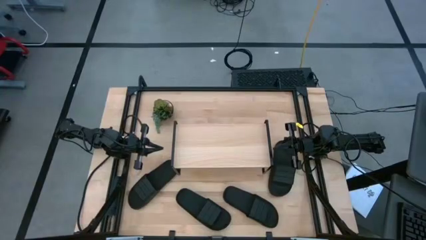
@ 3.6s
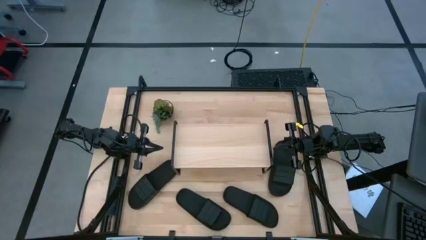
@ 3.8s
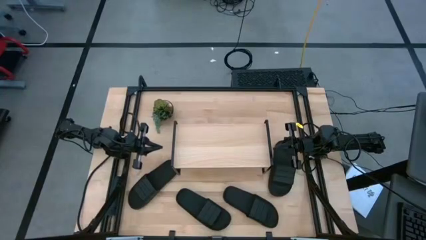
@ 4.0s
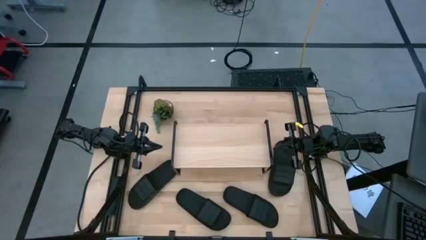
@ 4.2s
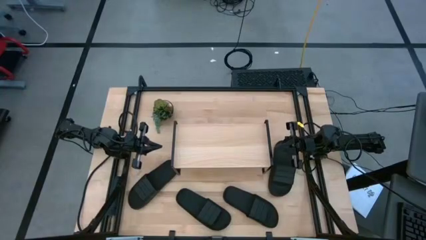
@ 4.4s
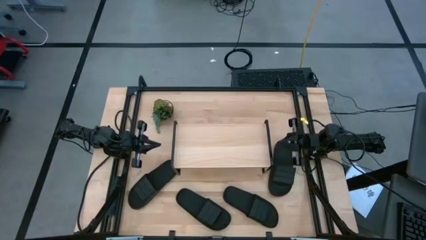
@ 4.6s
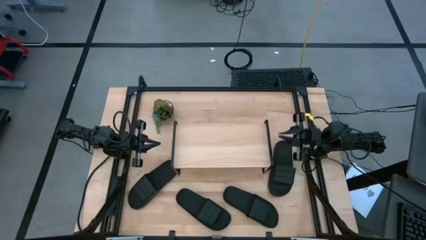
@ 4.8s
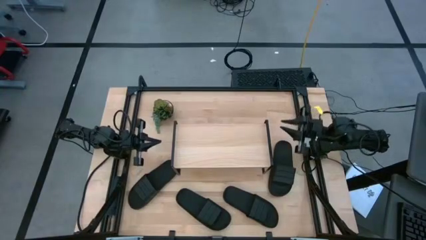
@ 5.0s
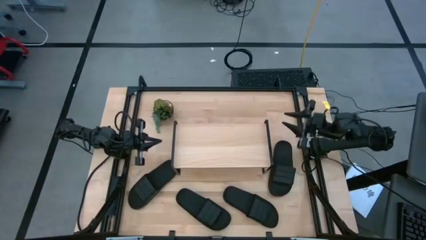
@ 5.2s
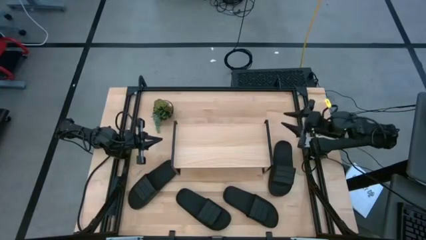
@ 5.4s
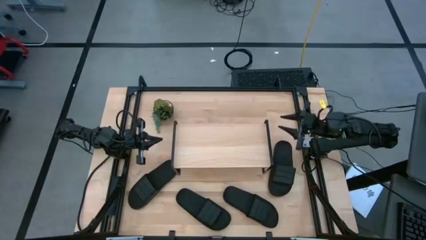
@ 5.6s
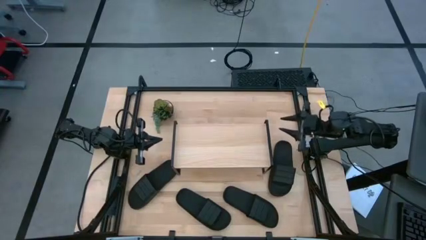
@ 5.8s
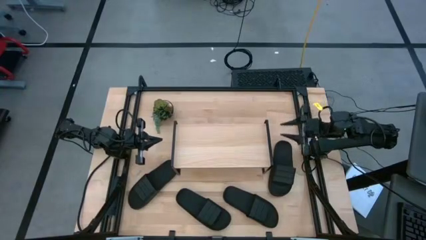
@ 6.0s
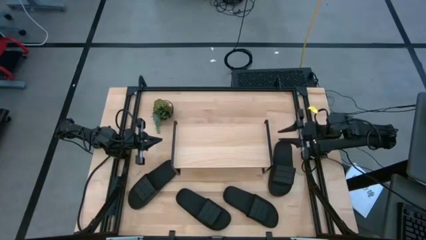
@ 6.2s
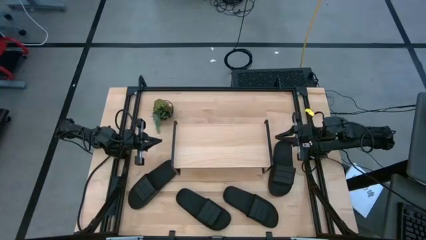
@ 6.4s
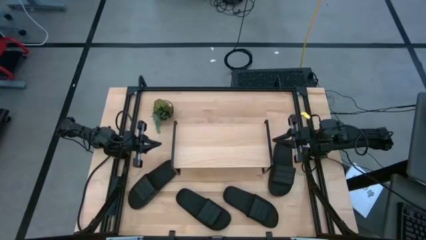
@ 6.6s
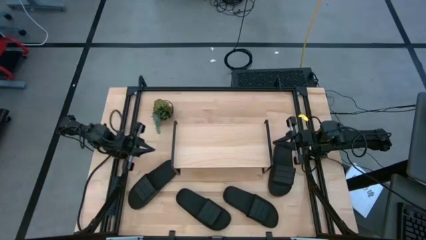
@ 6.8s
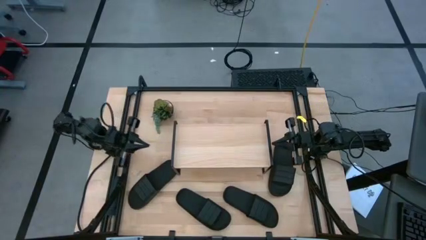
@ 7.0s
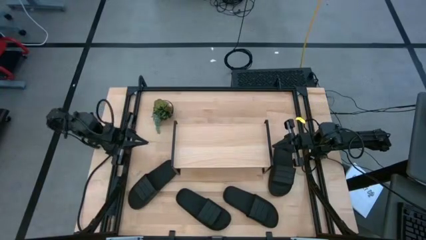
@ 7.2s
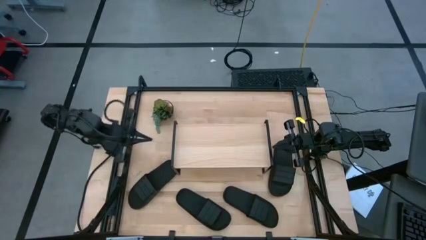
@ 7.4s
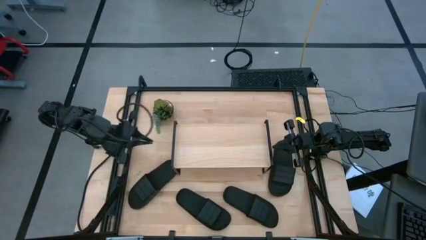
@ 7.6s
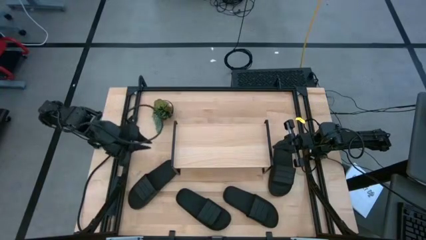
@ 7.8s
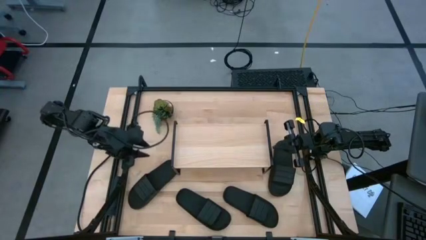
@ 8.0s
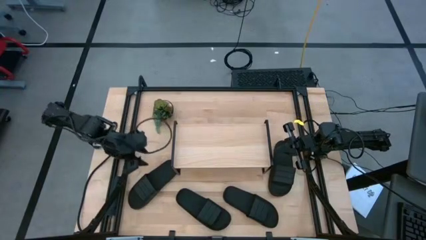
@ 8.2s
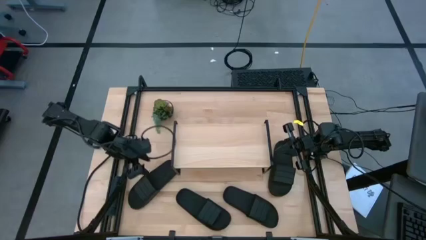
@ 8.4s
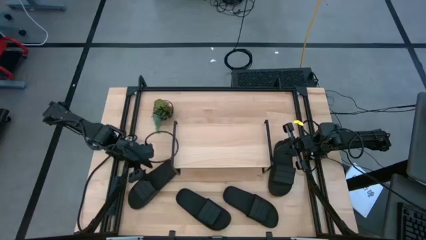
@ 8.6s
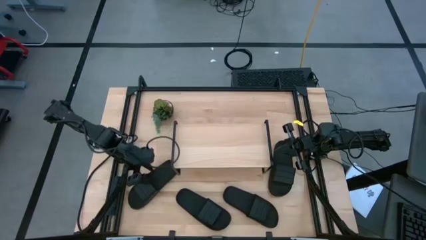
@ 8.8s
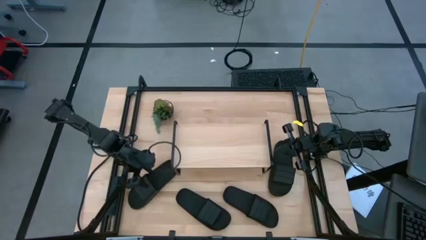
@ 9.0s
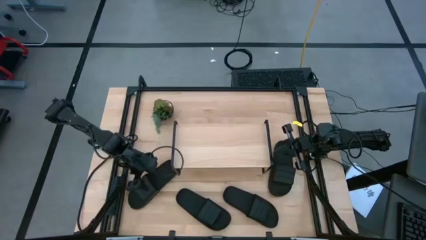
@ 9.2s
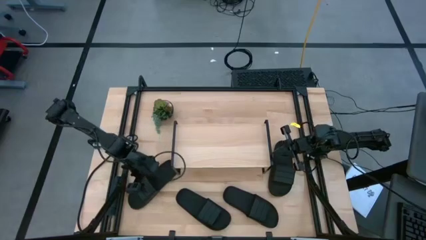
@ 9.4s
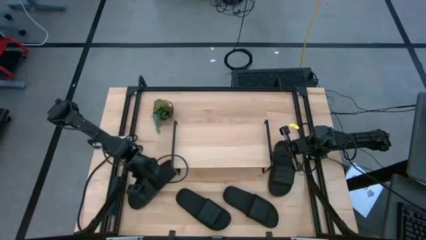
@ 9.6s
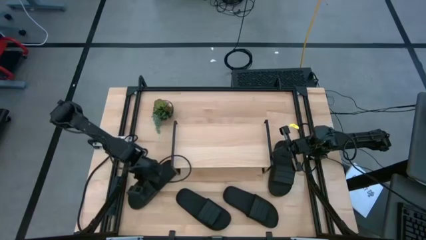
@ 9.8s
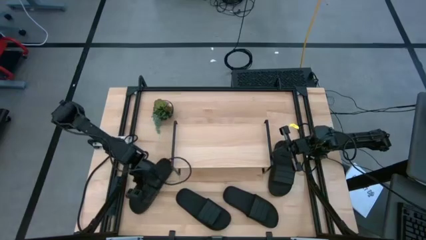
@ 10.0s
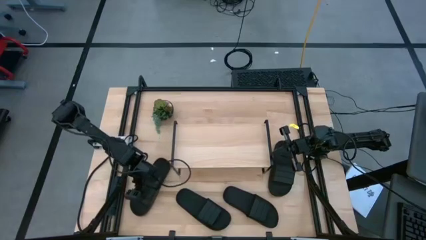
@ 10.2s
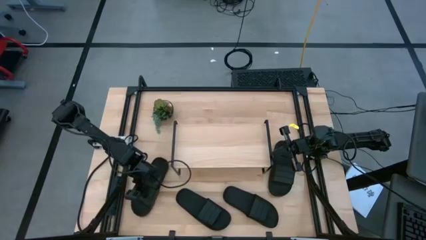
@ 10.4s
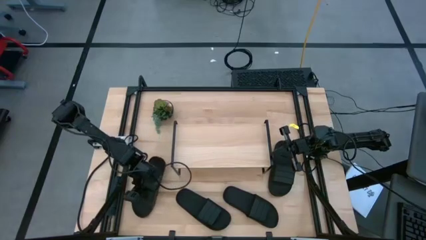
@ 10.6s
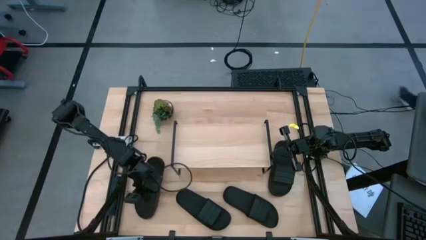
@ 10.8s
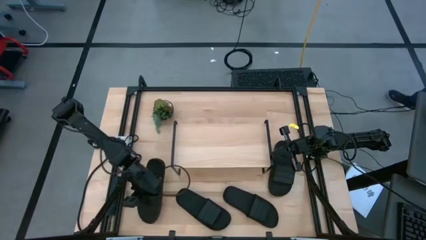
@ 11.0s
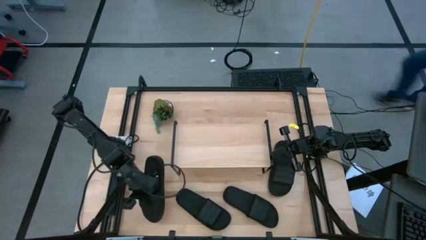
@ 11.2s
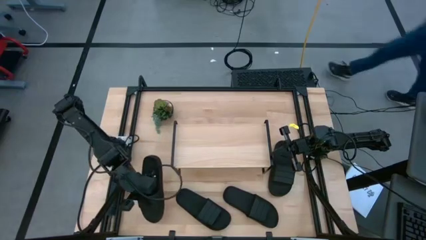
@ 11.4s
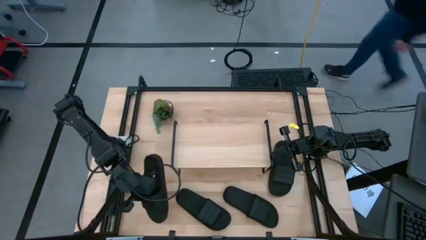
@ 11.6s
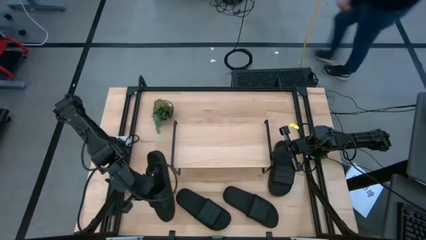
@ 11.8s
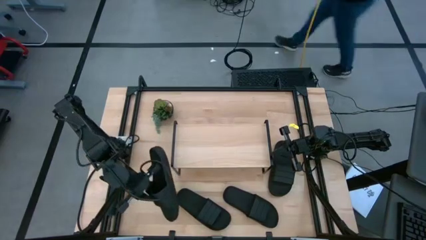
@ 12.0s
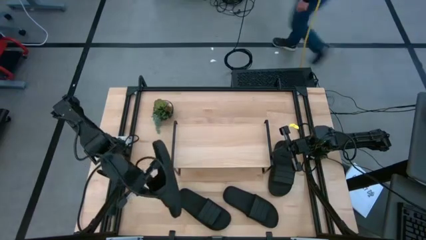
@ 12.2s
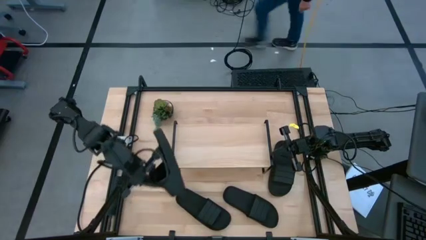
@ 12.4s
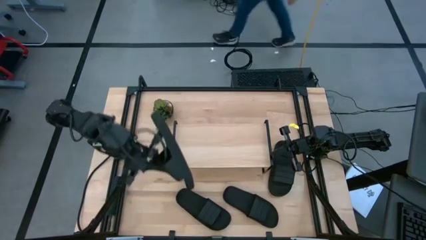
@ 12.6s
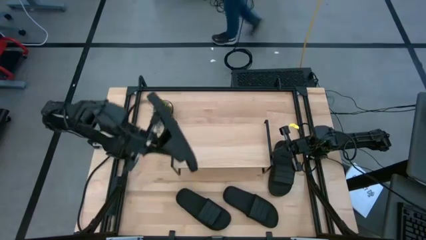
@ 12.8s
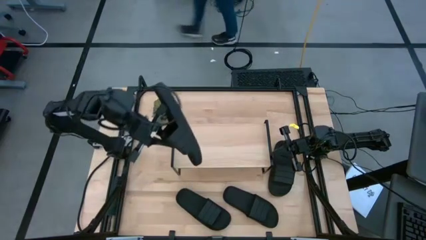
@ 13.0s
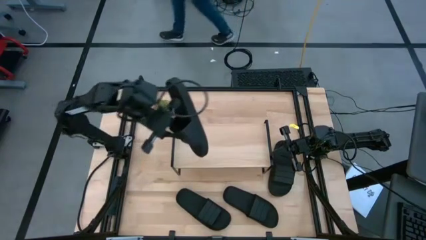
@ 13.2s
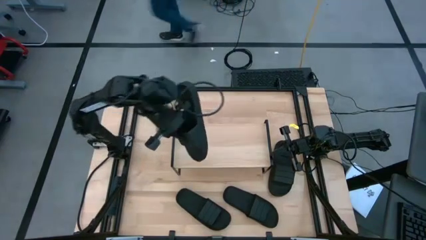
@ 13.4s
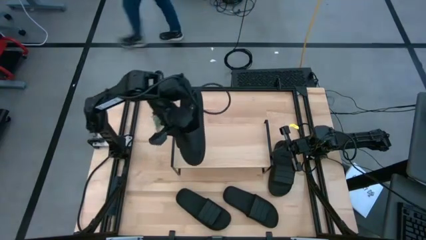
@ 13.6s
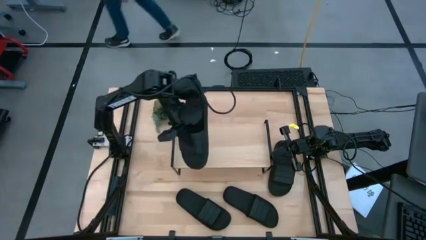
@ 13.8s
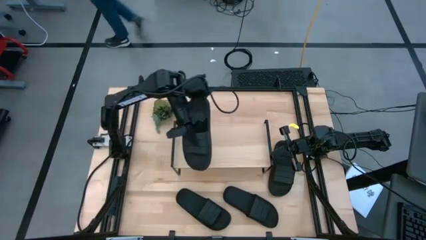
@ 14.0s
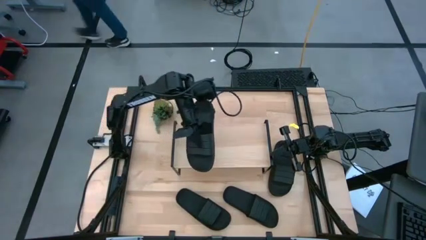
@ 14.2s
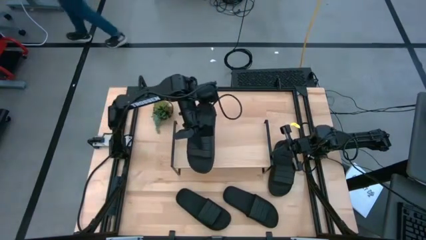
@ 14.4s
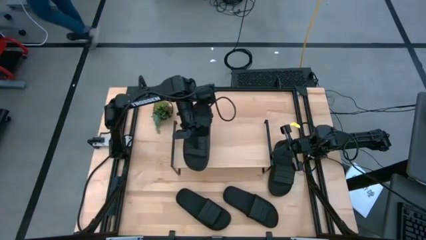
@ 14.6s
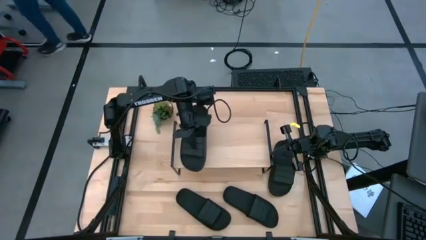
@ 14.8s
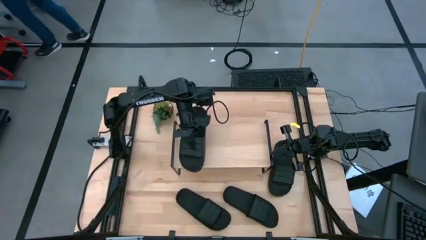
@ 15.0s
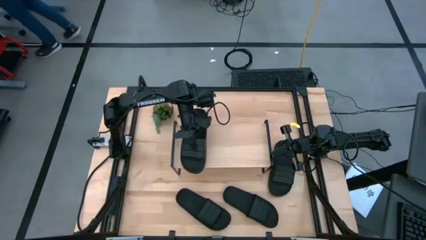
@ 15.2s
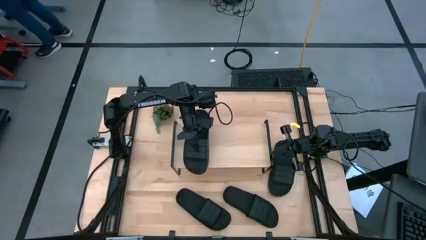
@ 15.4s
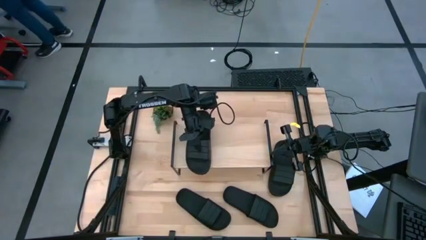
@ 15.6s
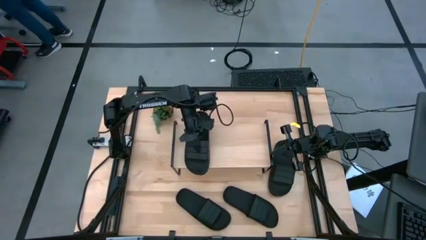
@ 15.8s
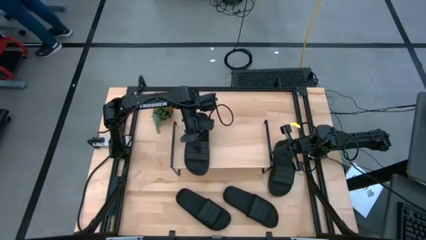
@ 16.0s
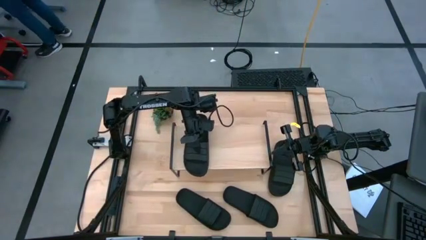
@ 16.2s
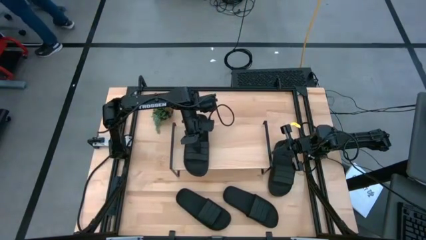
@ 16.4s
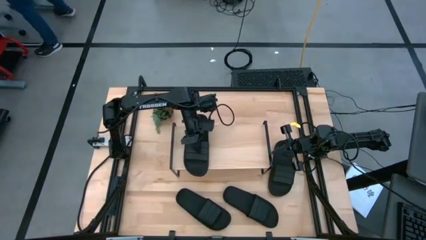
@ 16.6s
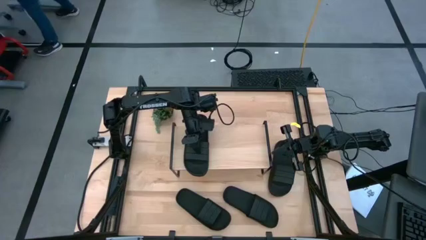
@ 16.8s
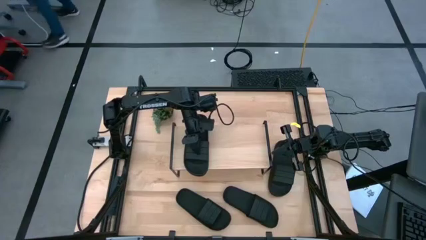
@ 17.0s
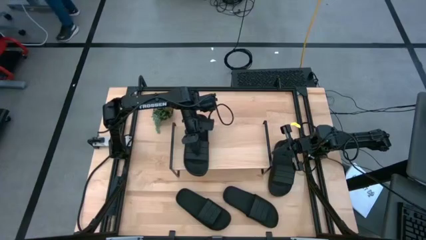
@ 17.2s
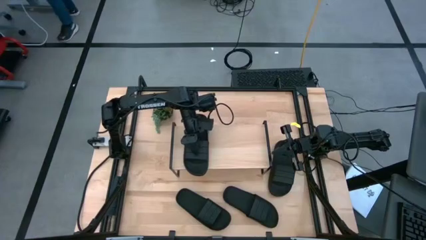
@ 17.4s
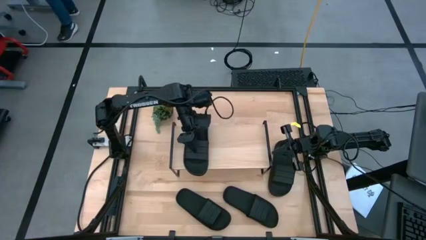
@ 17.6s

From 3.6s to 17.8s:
Task: Pick and place slides into the shelf
Put the black slipper on the shelf
